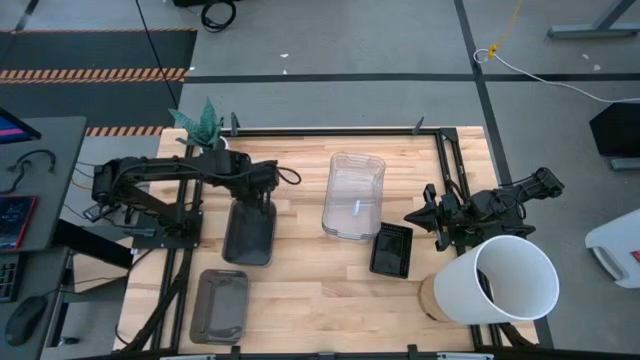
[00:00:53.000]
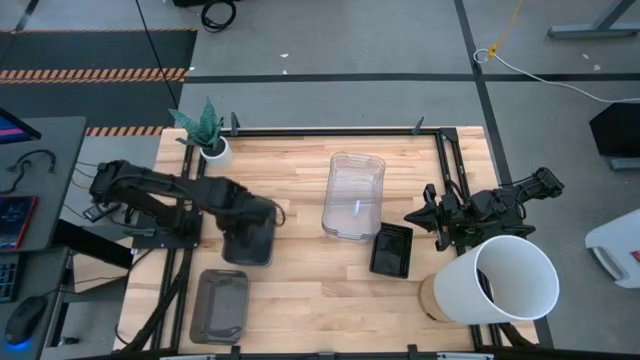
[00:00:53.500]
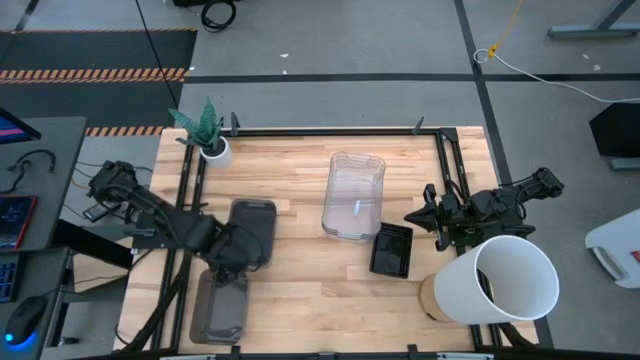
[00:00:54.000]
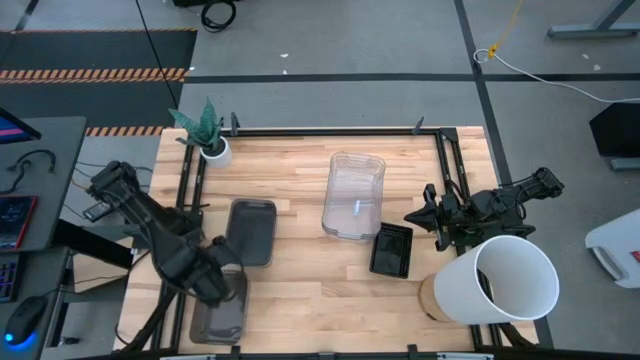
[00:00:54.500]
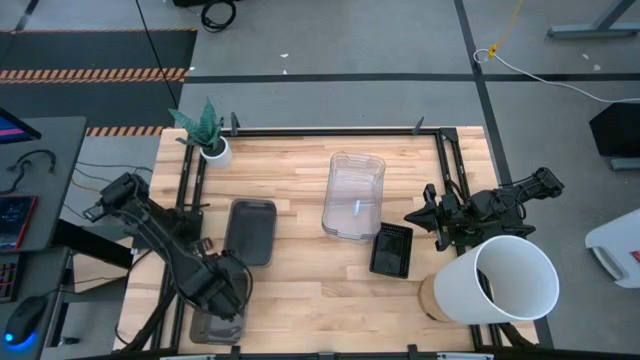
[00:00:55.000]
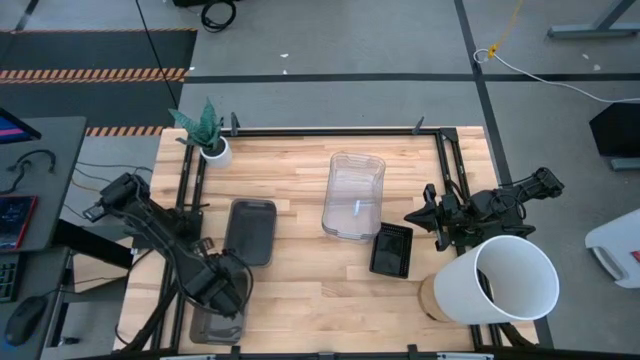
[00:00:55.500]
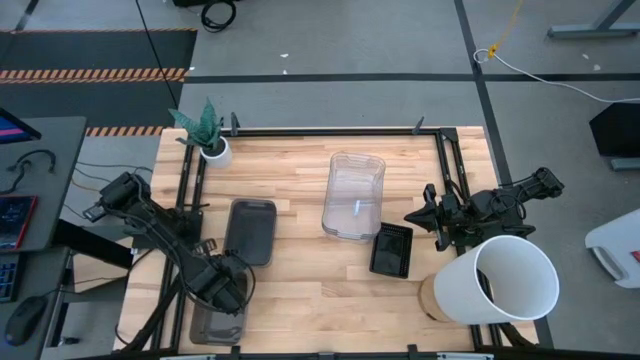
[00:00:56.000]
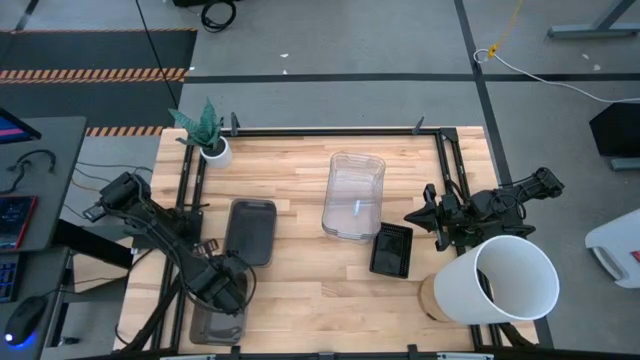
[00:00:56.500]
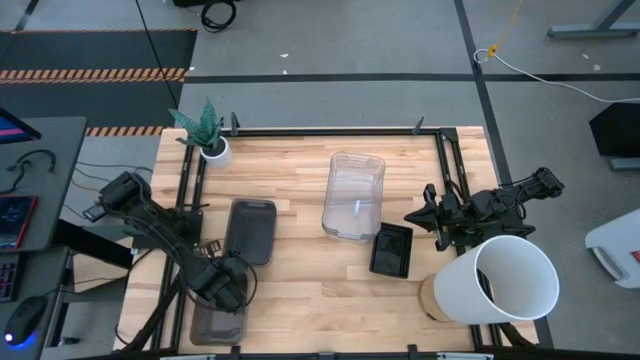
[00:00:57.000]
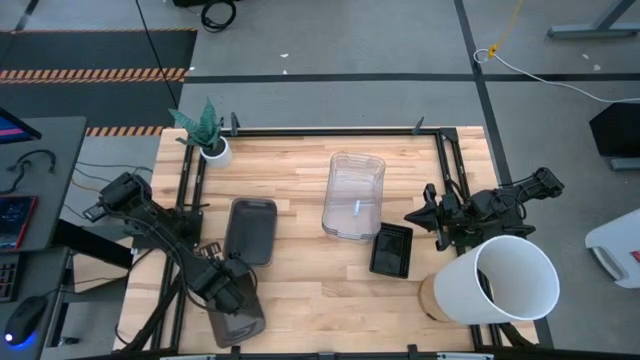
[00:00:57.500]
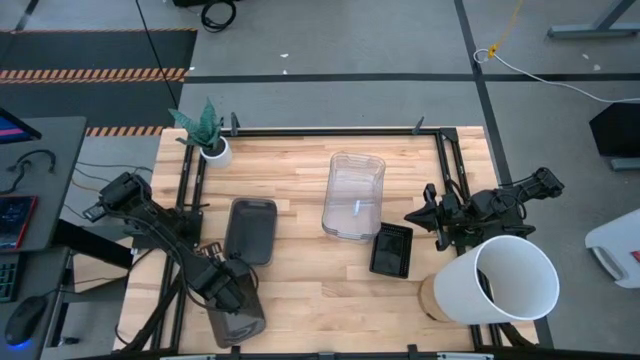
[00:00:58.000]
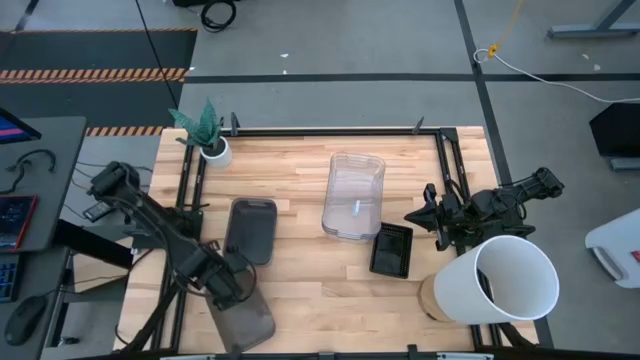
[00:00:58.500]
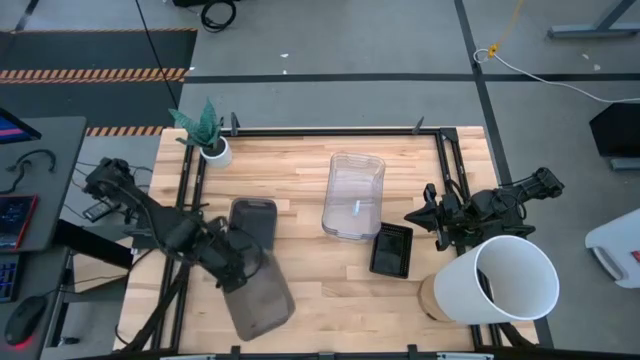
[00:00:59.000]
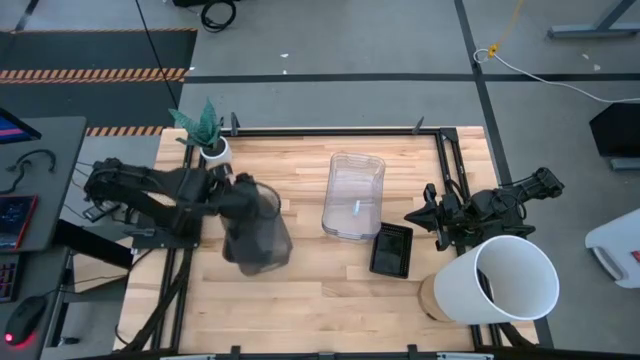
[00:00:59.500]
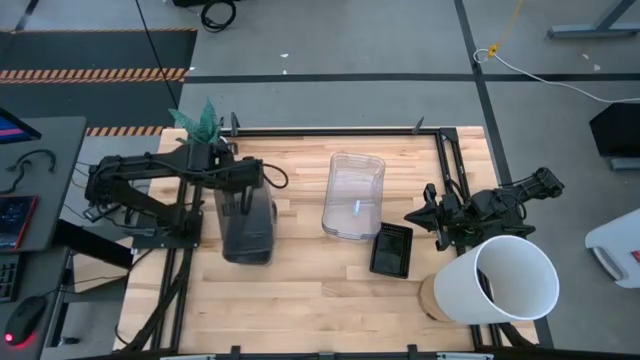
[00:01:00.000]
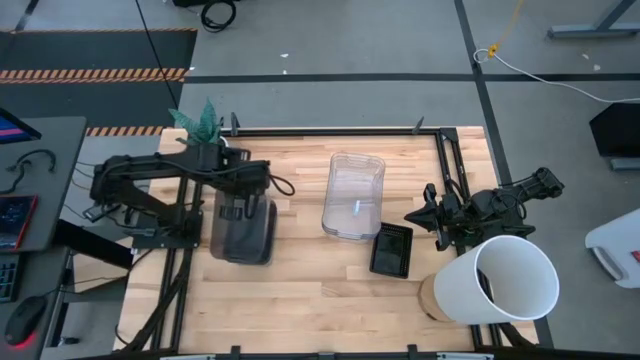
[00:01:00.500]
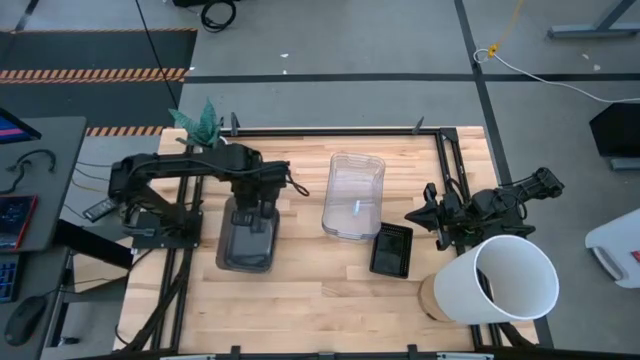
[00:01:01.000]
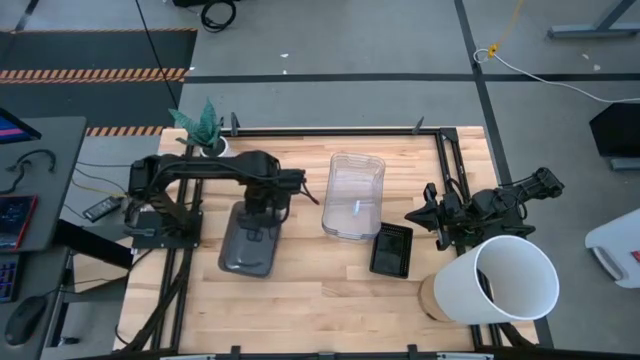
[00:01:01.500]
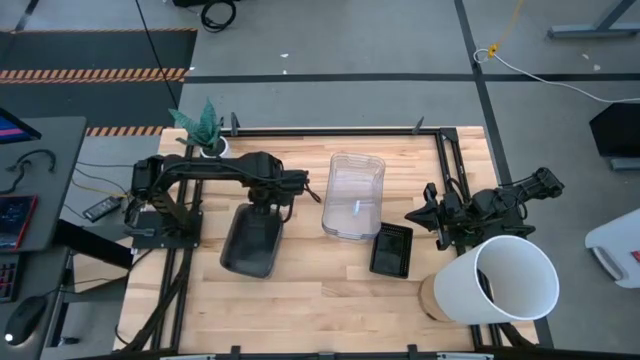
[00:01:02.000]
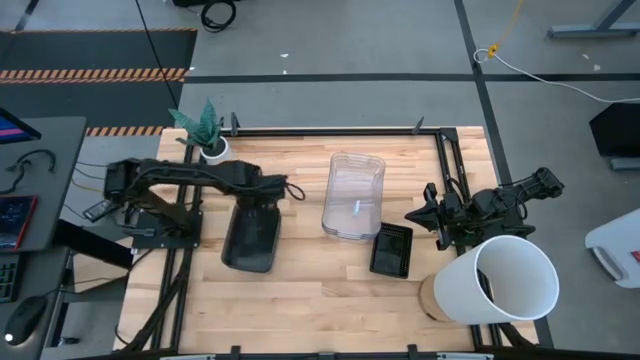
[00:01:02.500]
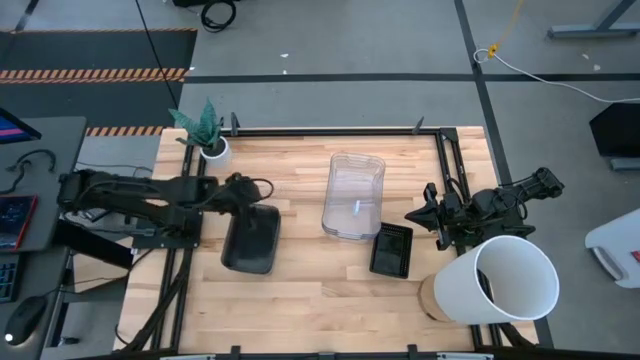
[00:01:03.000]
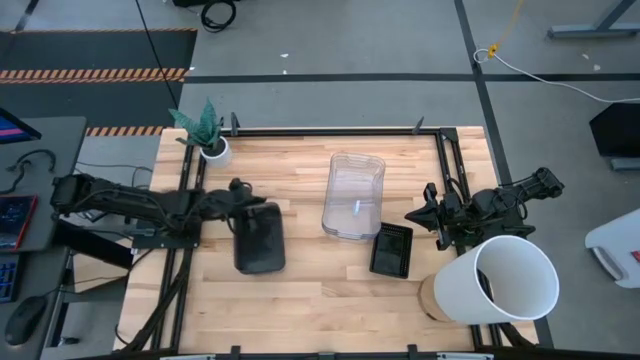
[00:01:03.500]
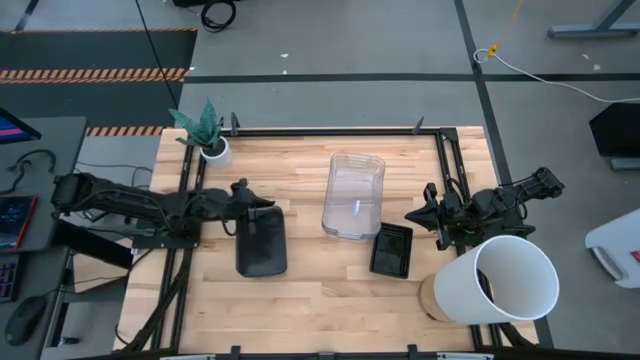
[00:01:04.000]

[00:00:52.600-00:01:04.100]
Stack the bottom gray bin on the top gray bins

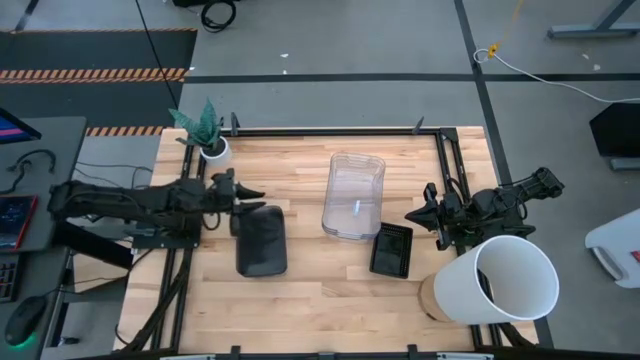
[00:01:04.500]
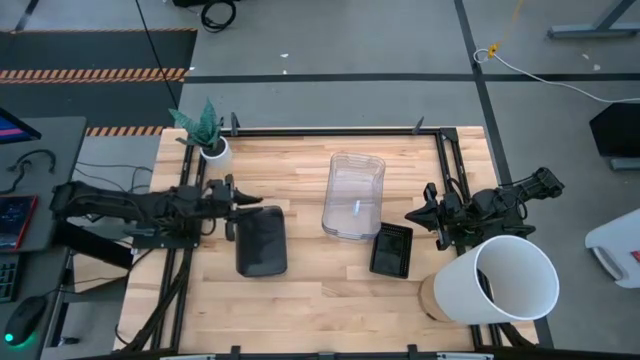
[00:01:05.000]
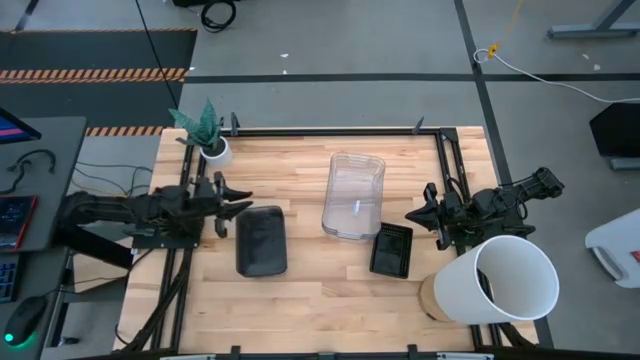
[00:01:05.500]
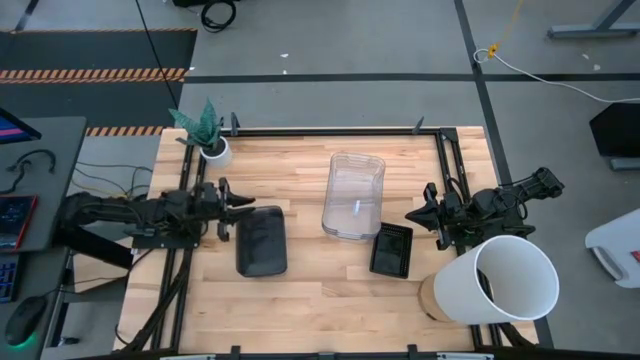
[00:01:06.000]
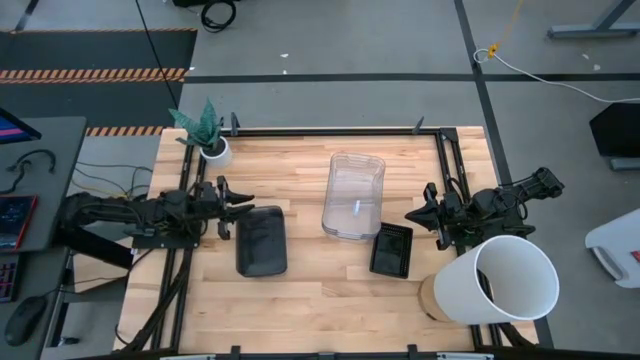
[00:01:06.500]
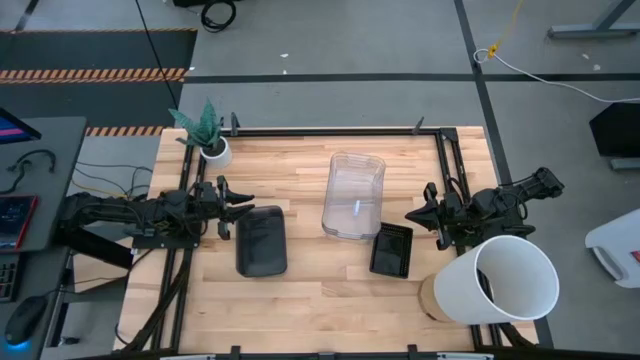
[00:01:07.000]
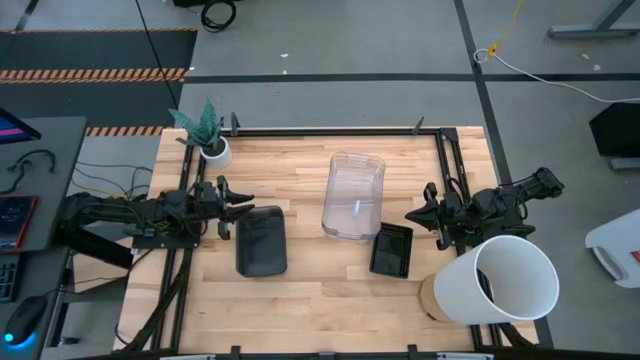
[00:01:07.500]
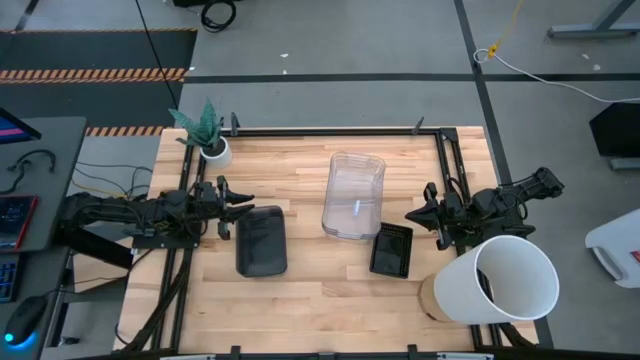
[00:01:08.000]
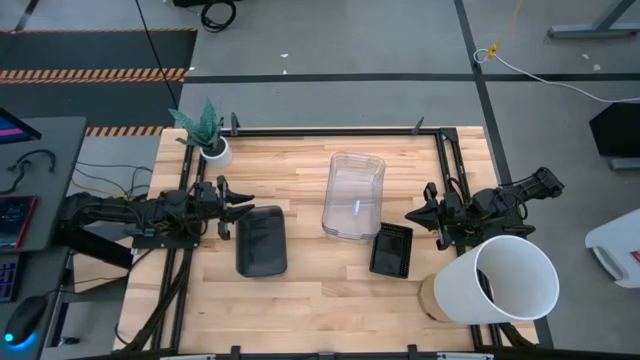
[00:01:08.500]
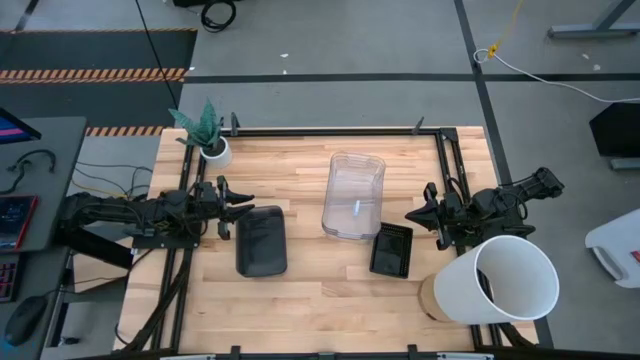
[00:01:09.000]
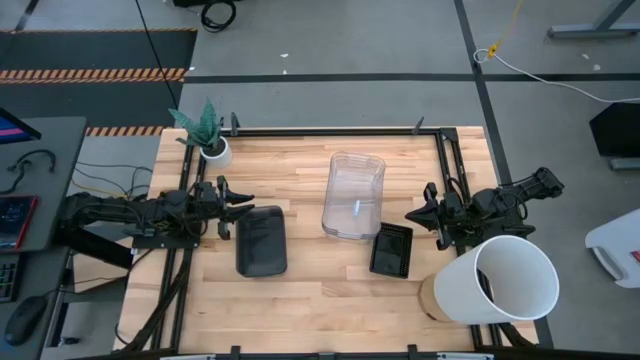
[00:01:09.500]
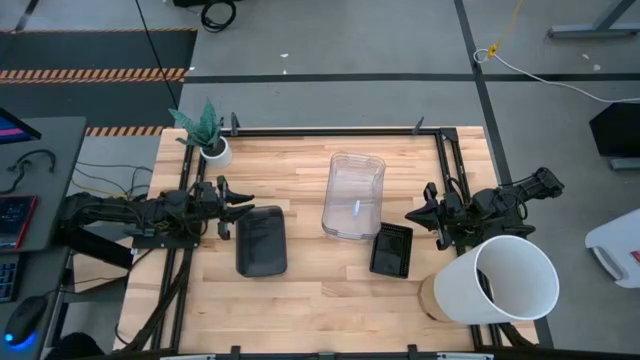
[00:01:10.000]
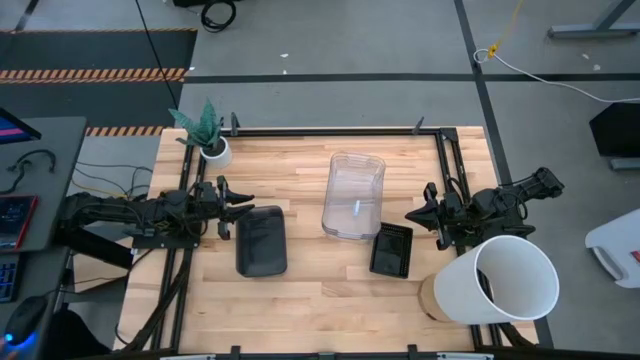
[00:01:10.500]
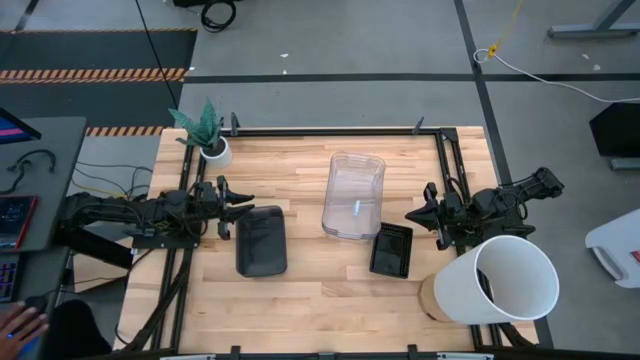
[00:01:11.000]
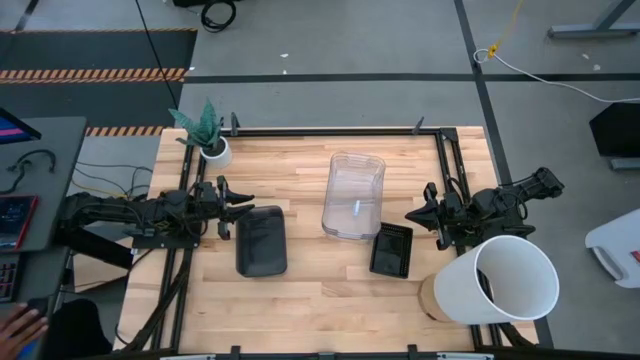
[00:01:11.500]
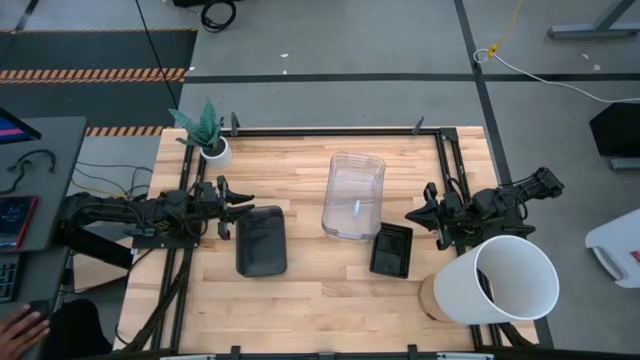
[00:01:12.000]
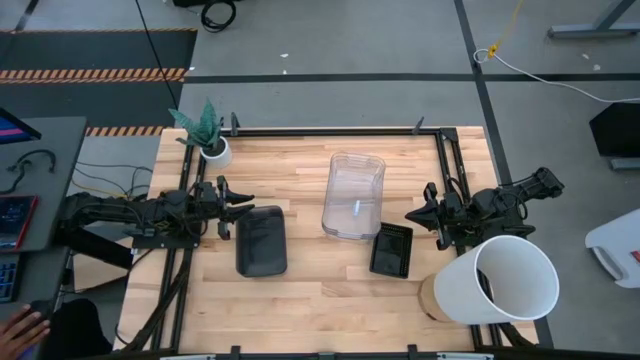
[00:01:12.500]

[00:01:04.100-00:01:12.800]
Return to Home Position
